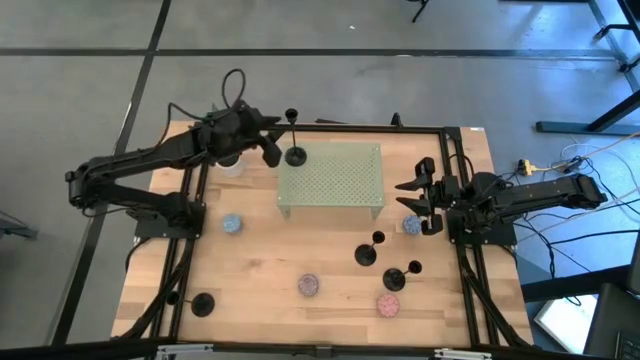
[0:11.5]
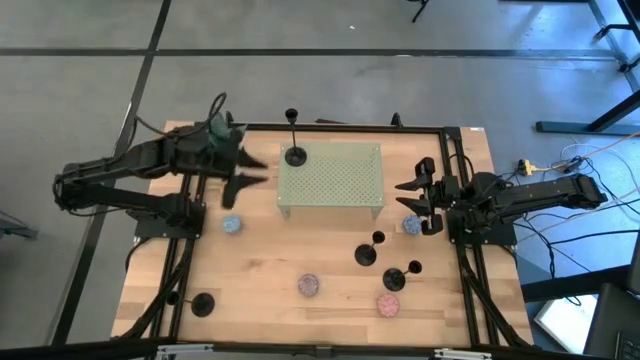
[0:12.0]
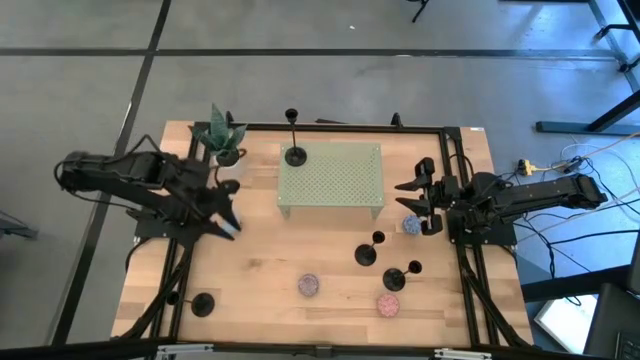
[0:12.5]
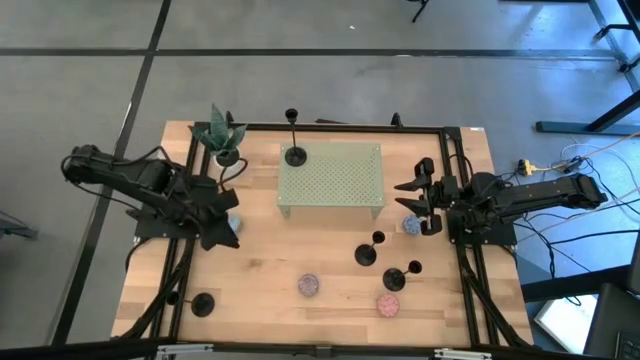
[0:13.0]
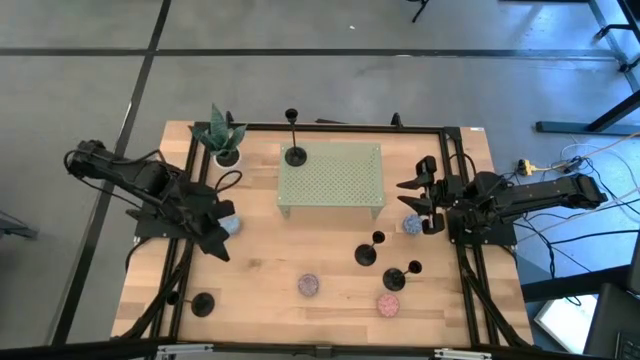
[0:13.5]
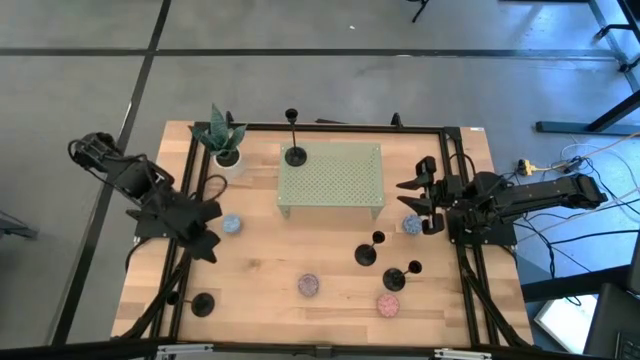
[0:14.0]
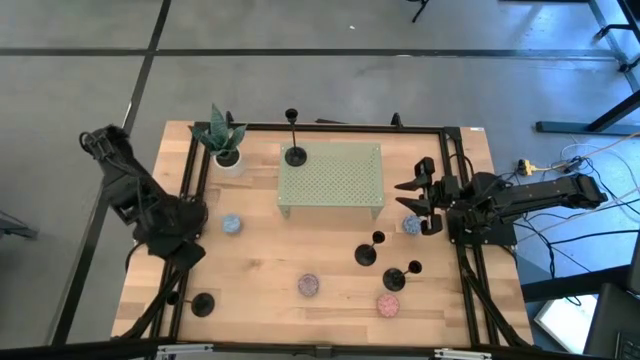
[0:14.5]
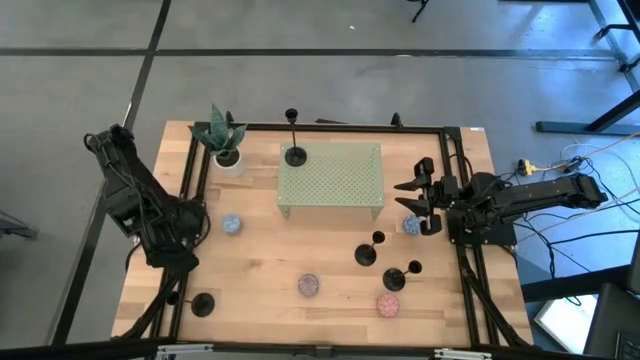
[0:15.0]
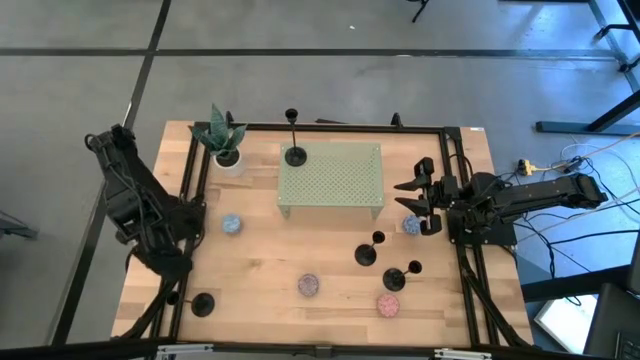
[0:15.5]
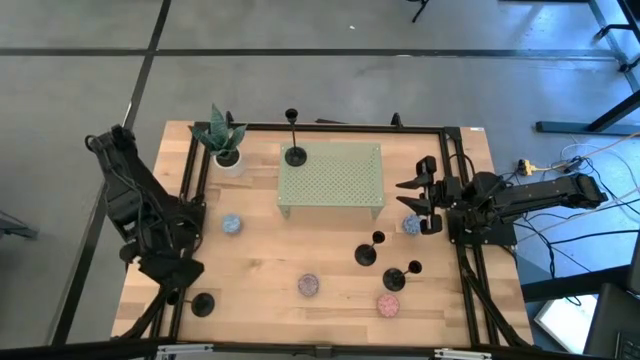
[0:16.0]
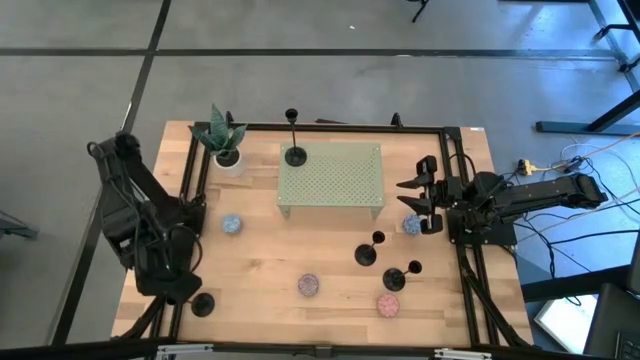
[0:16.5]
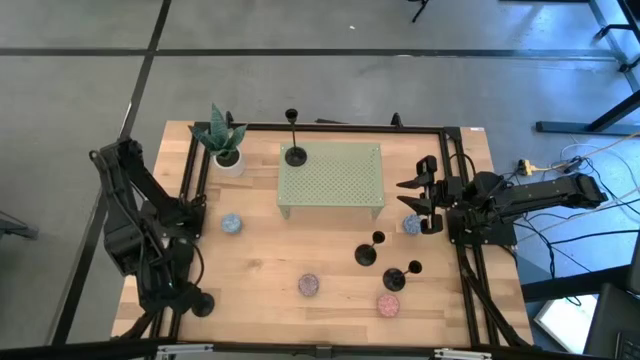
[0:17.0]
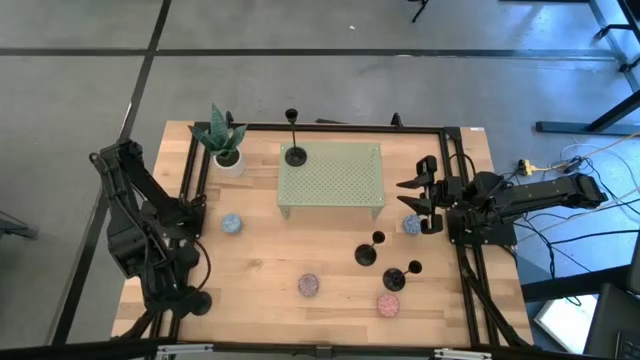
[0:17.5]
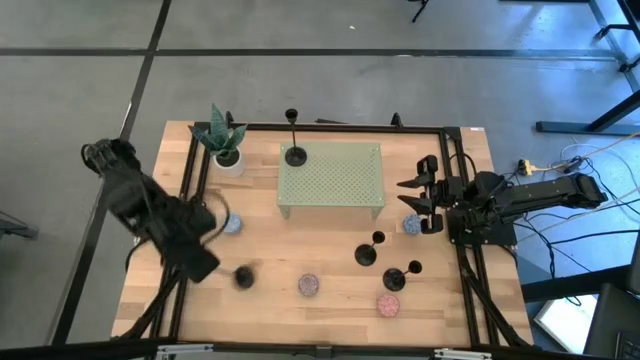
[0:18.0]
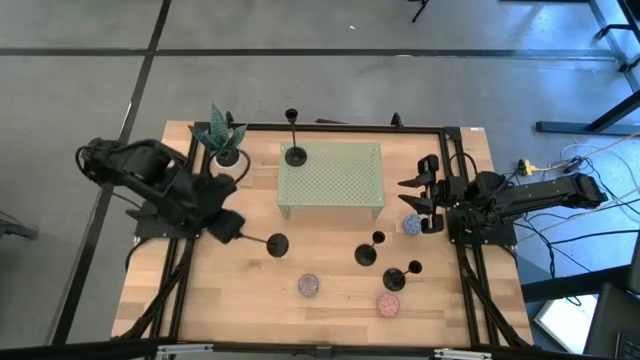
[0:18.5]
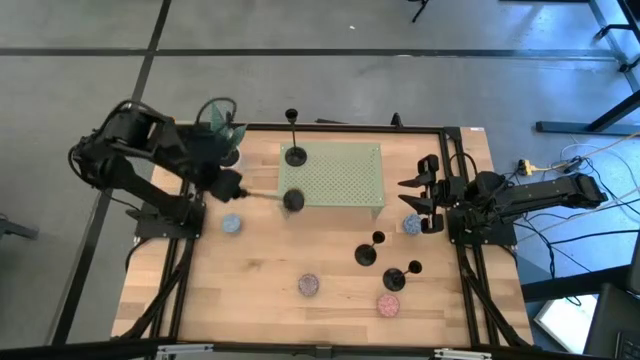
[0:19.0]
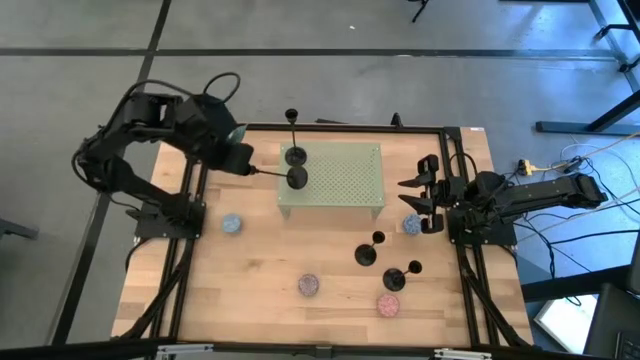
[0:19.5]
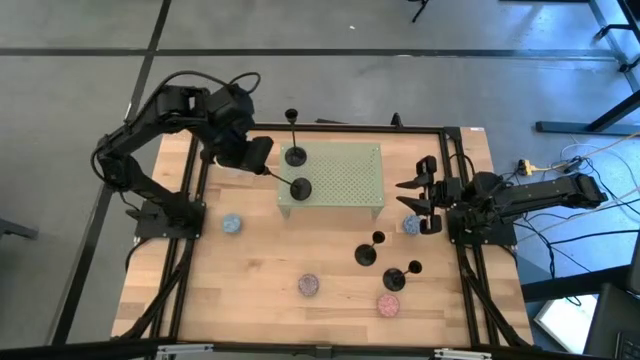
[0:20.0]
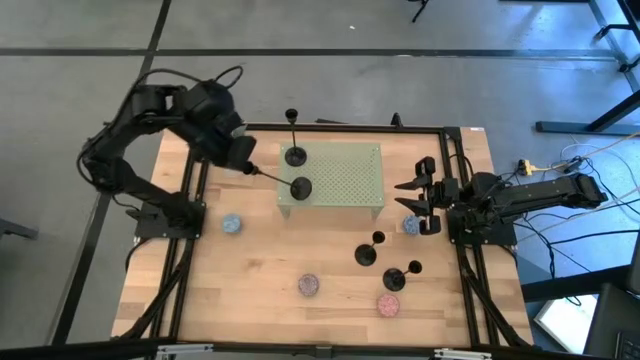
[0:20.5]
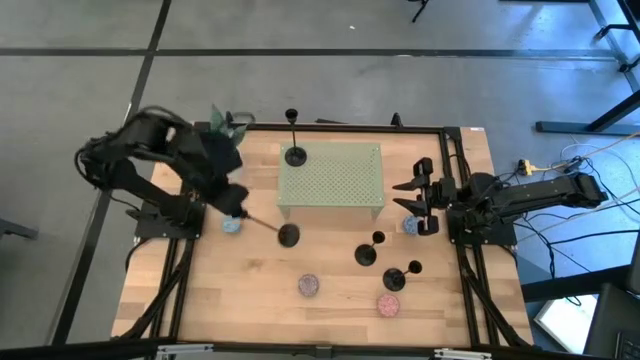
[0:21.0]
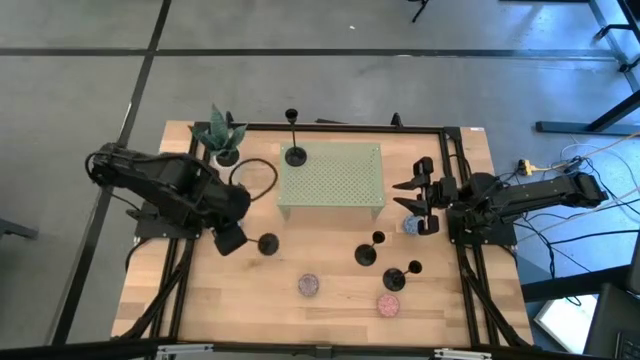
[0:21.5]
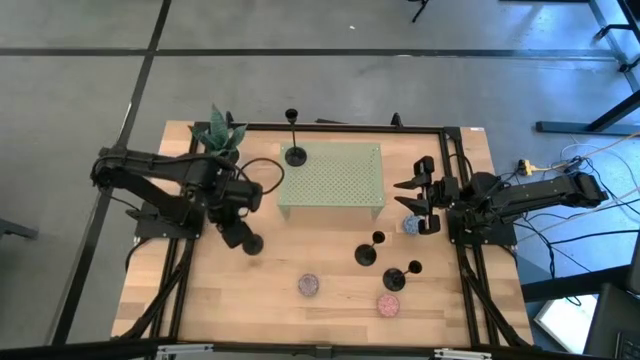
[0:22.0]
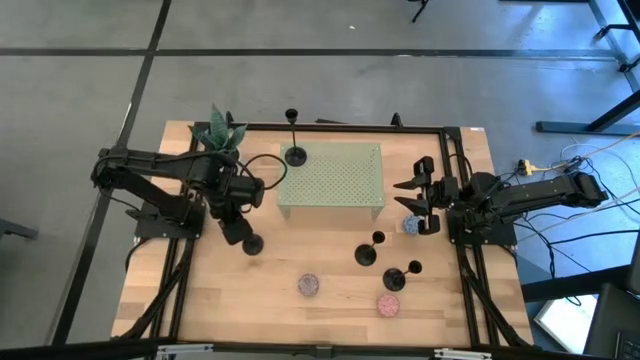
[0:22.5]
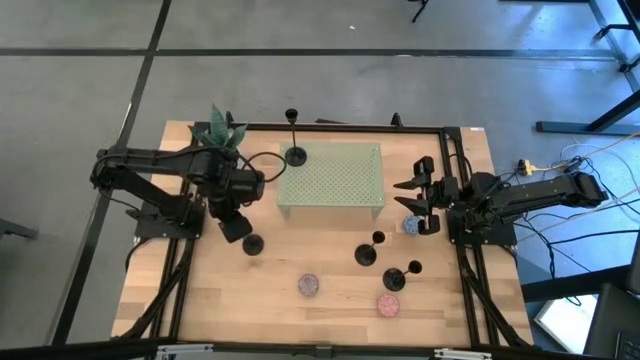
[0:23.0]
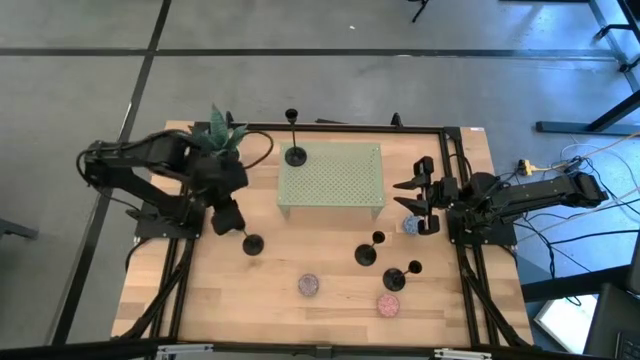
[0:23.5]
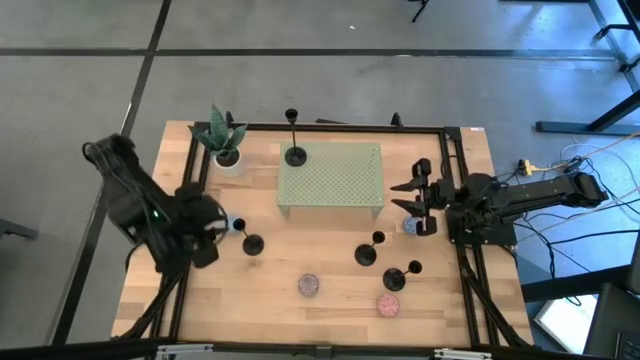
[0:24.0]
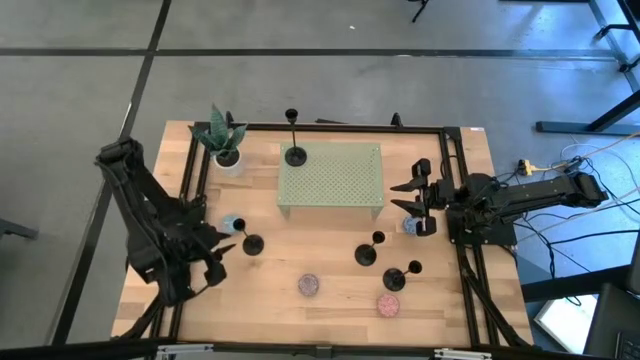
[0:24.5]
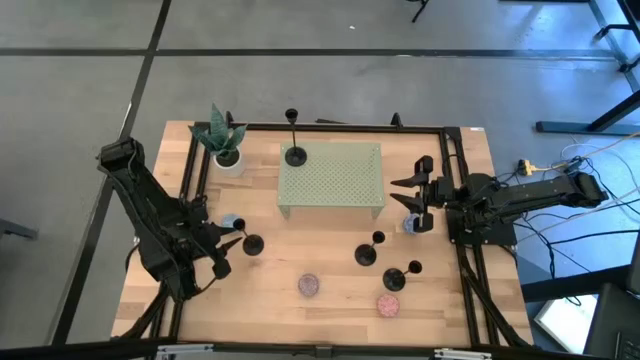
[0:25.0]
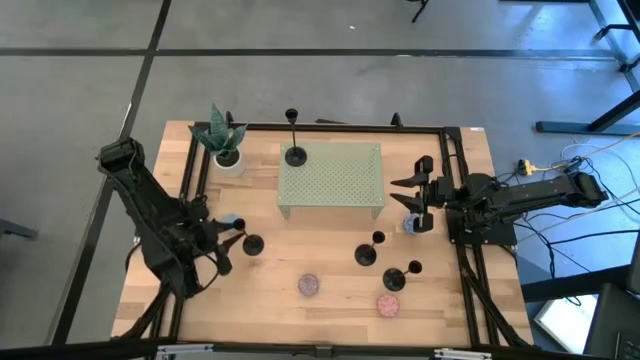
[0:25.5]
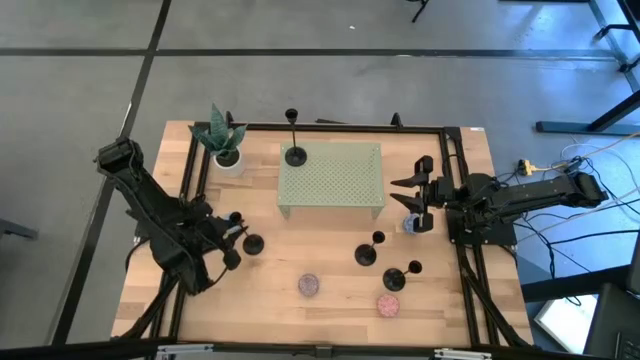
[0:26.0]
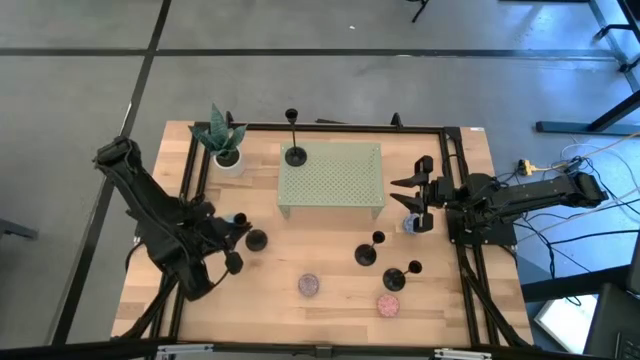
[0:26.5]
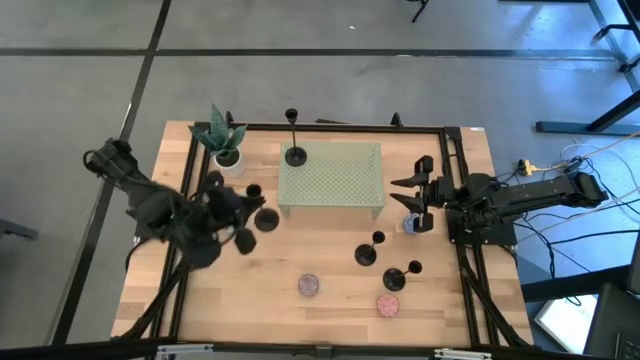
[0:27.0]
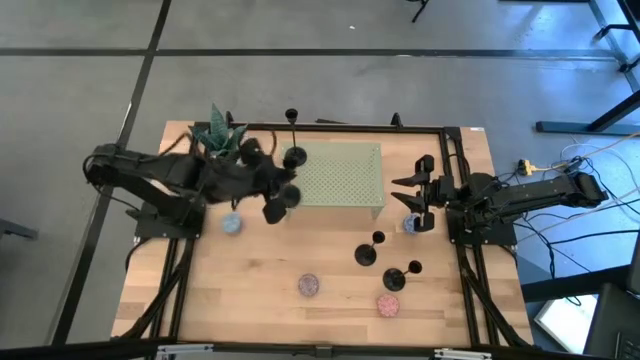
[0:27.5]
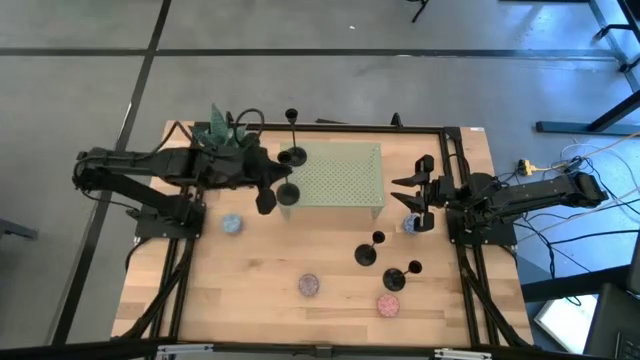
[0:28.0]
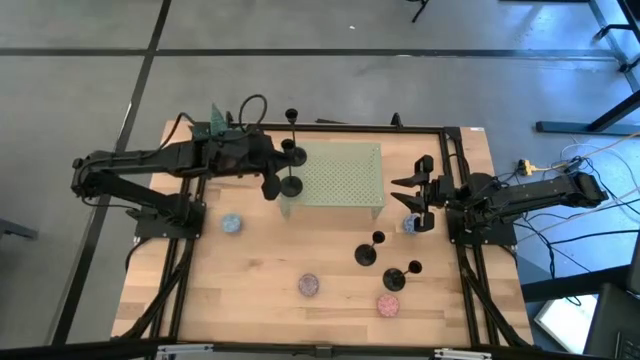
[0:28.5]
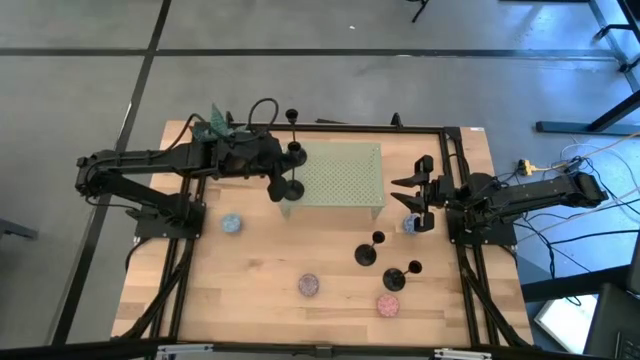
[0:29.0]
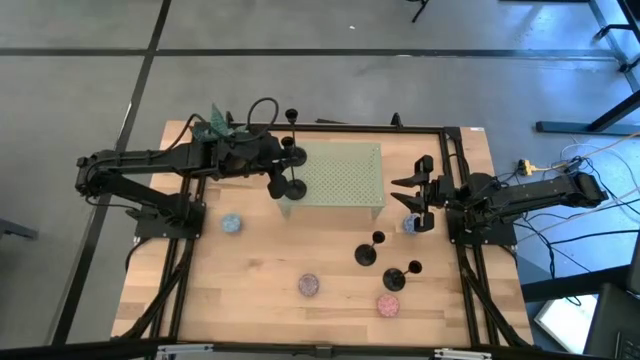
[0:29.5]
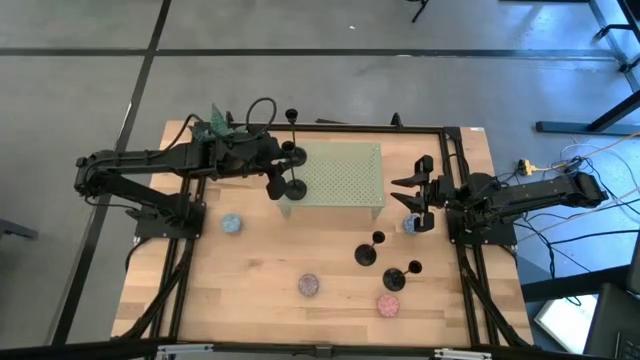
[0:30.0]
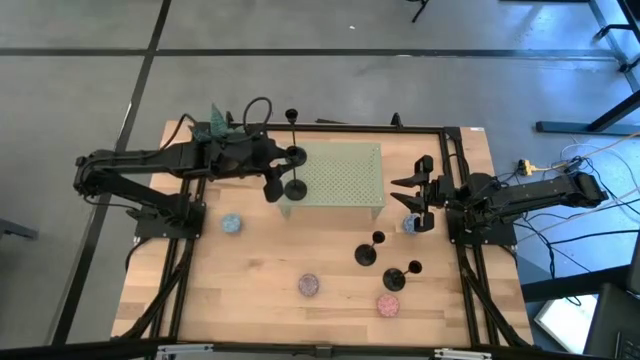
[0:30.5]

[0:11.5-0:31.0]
Task: Pick & Place candle stick holders
Align the black candle holder with the black candle holder on the shelf
